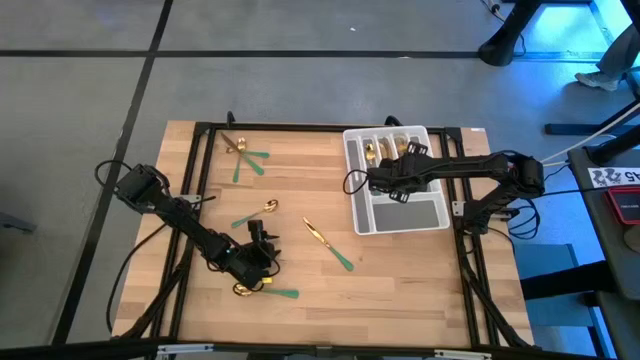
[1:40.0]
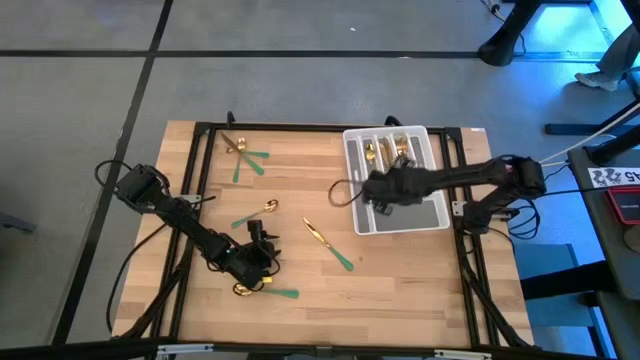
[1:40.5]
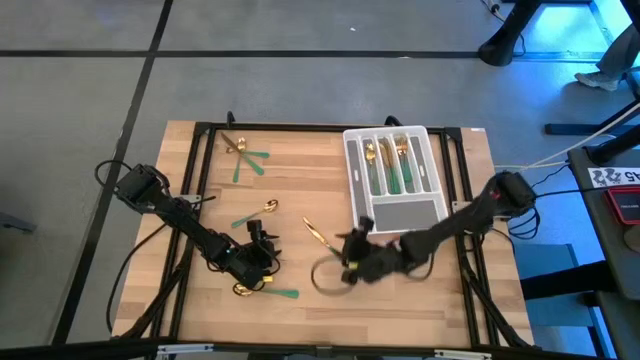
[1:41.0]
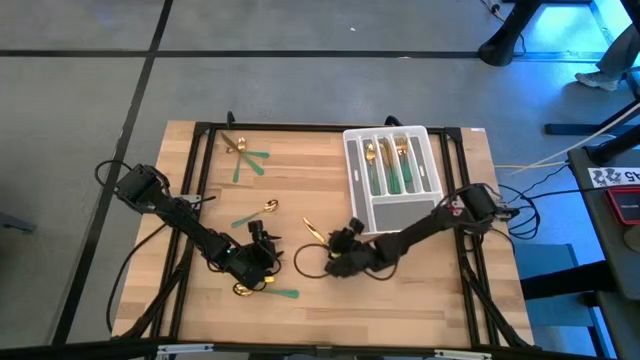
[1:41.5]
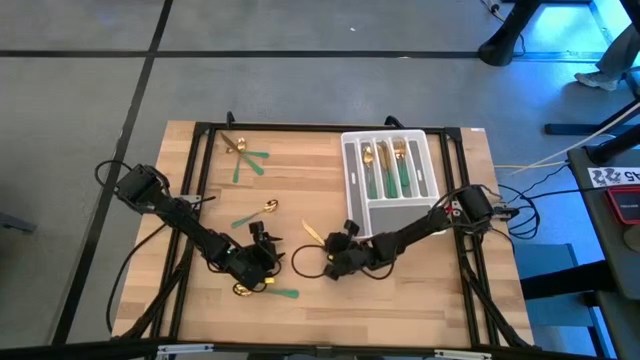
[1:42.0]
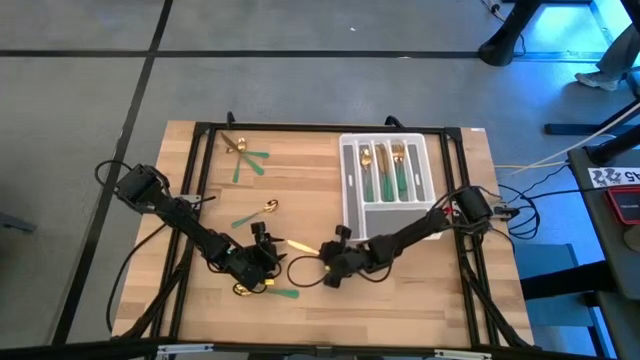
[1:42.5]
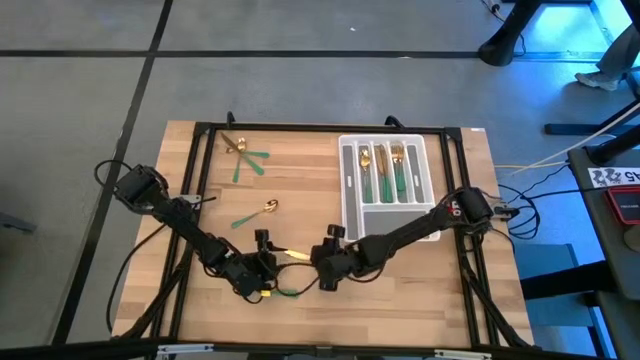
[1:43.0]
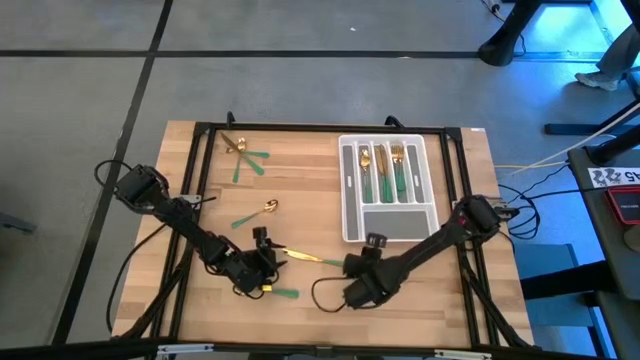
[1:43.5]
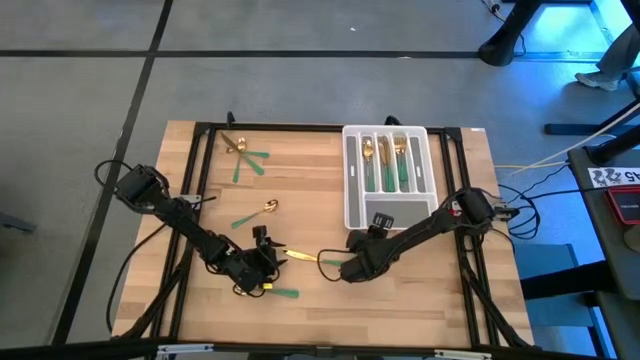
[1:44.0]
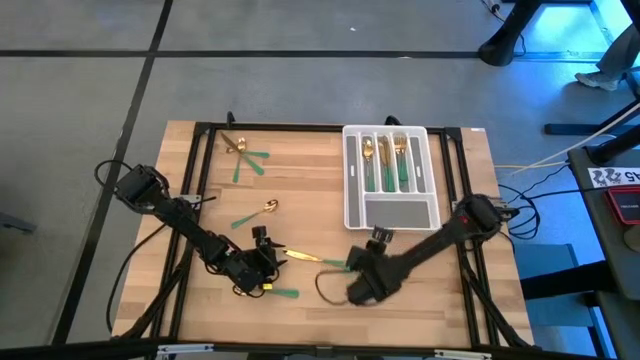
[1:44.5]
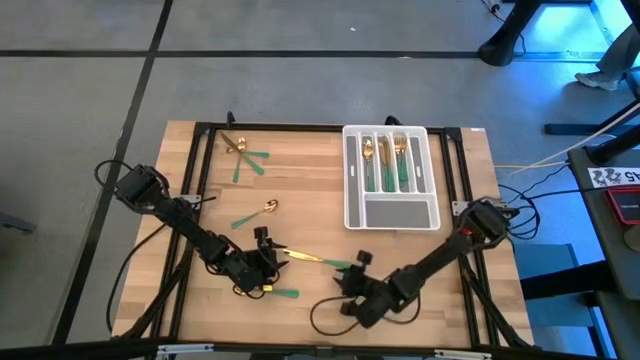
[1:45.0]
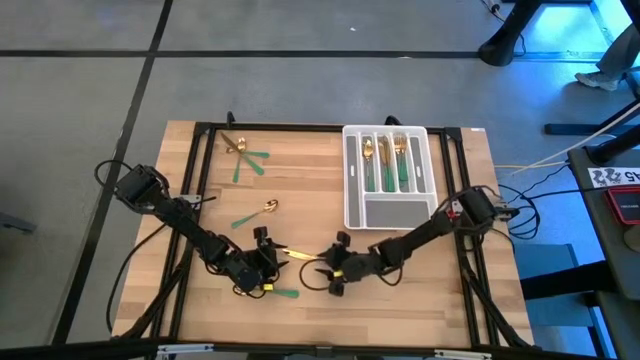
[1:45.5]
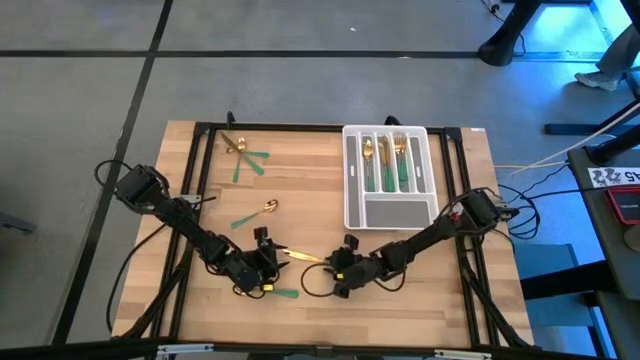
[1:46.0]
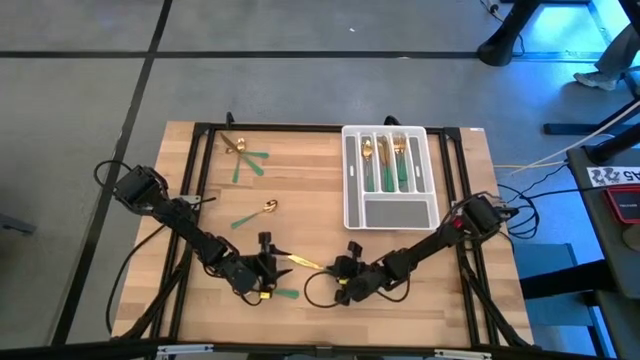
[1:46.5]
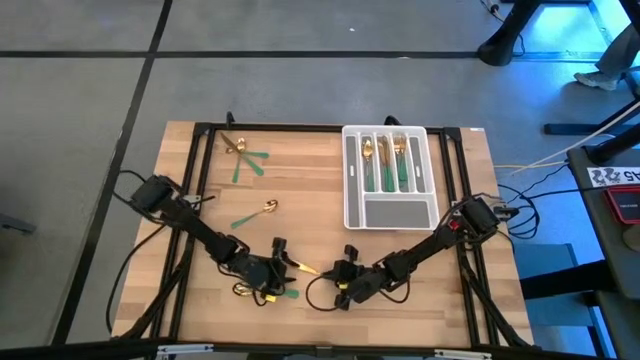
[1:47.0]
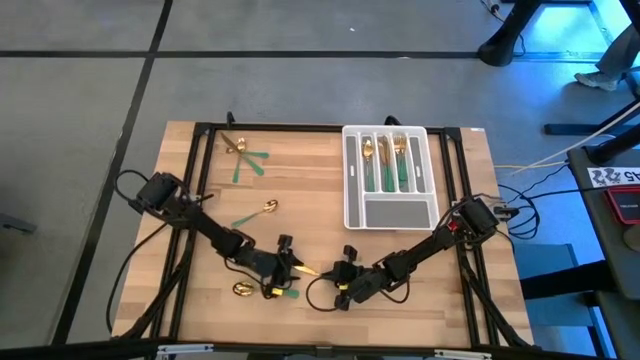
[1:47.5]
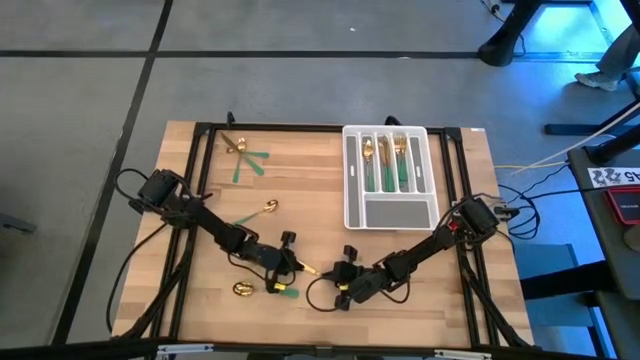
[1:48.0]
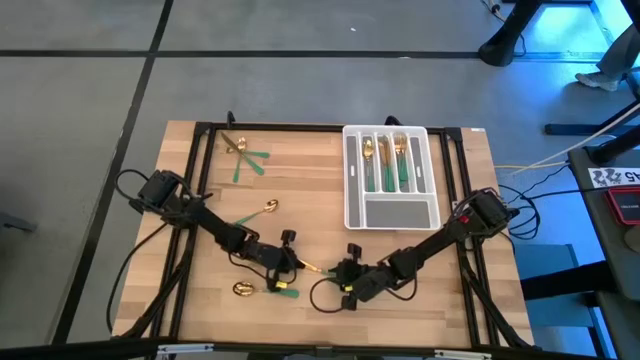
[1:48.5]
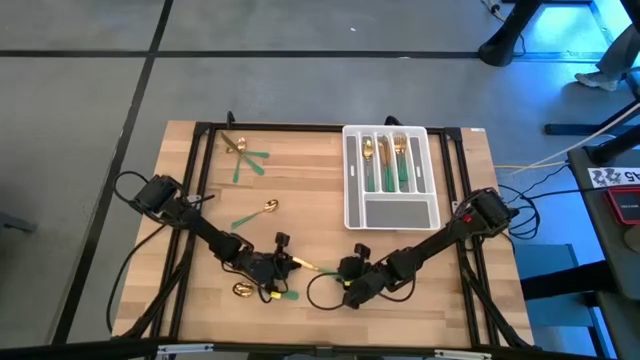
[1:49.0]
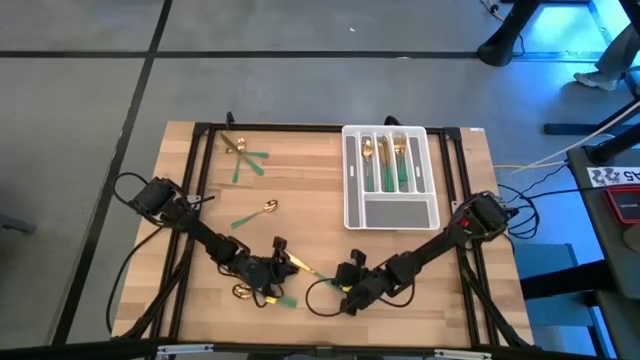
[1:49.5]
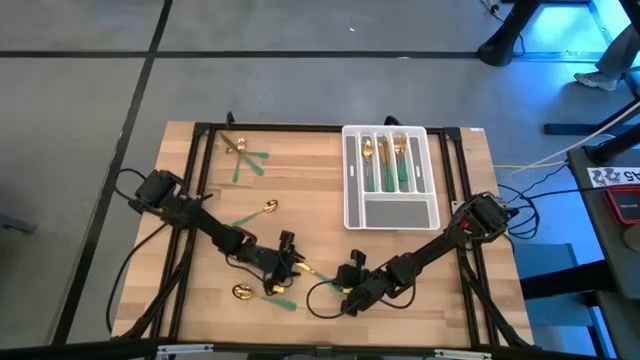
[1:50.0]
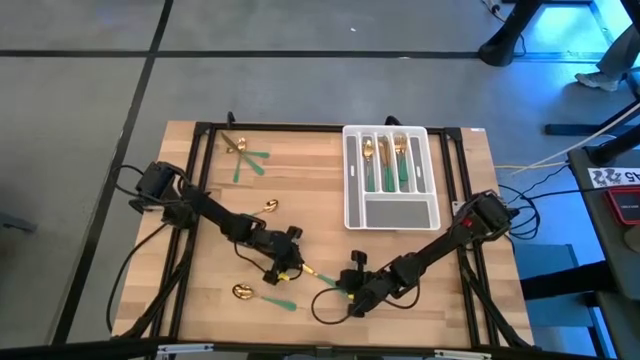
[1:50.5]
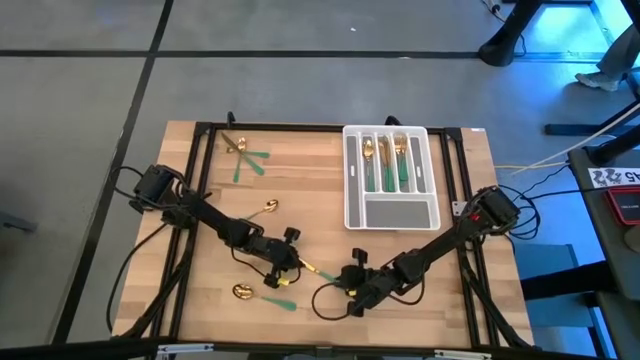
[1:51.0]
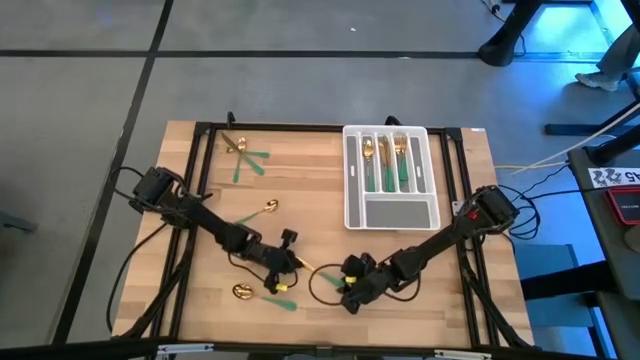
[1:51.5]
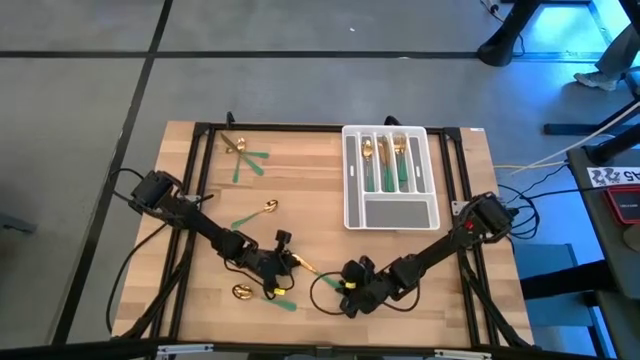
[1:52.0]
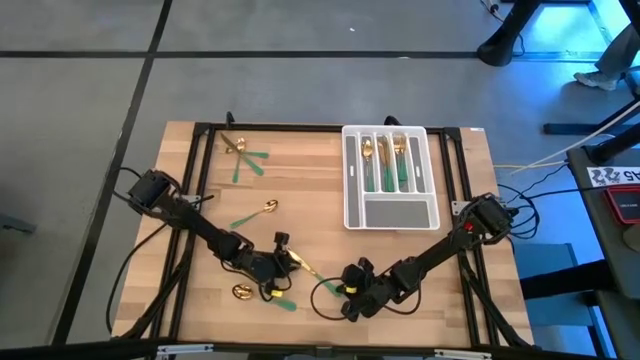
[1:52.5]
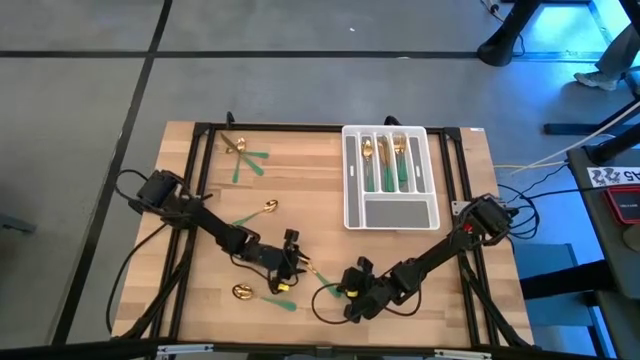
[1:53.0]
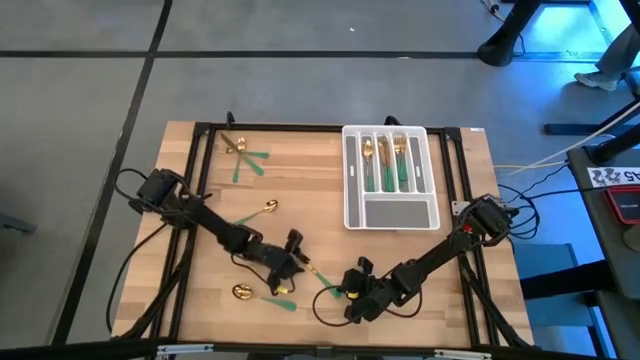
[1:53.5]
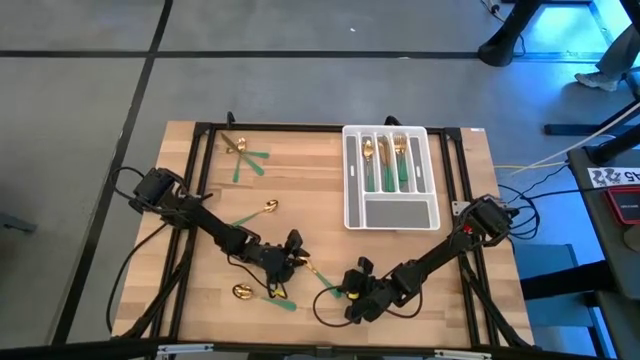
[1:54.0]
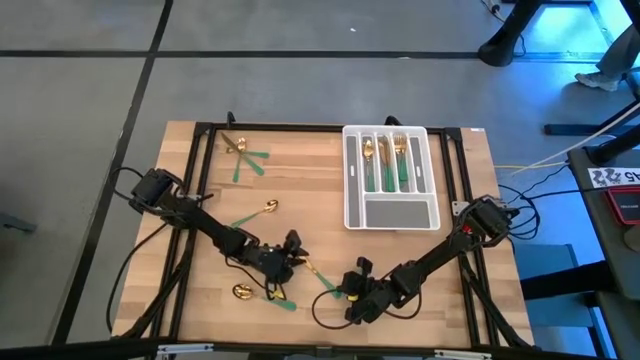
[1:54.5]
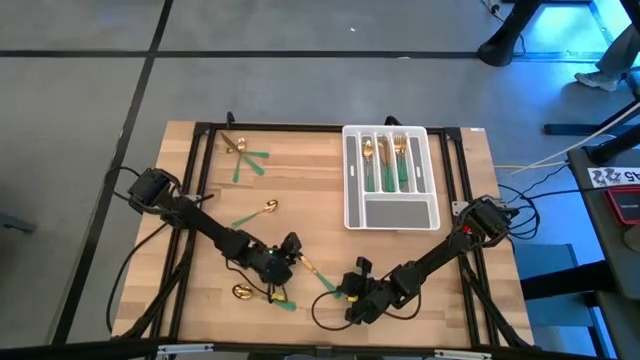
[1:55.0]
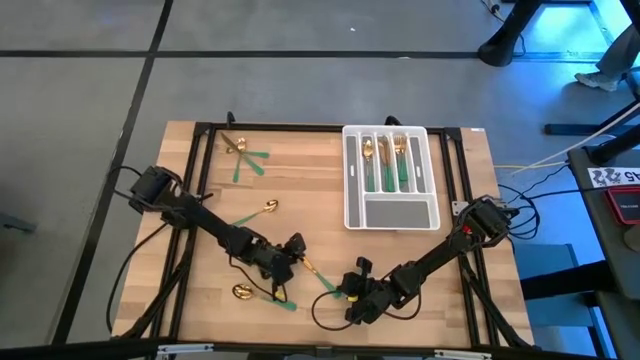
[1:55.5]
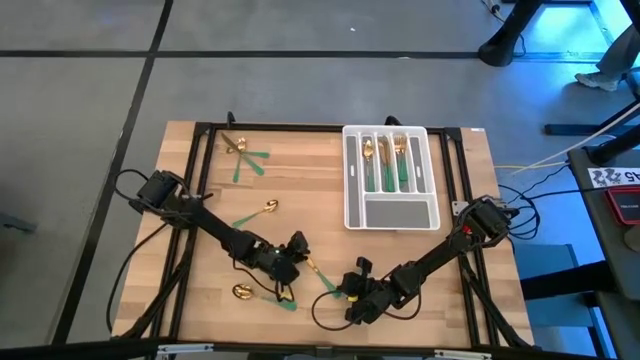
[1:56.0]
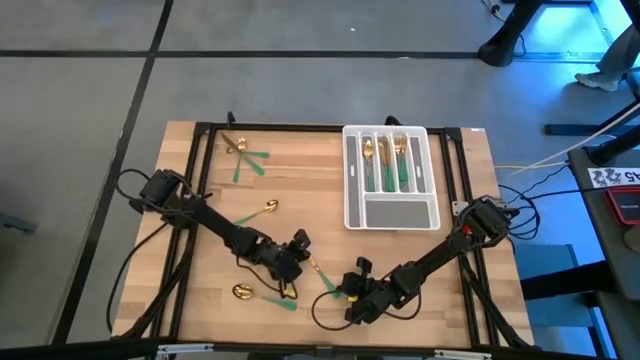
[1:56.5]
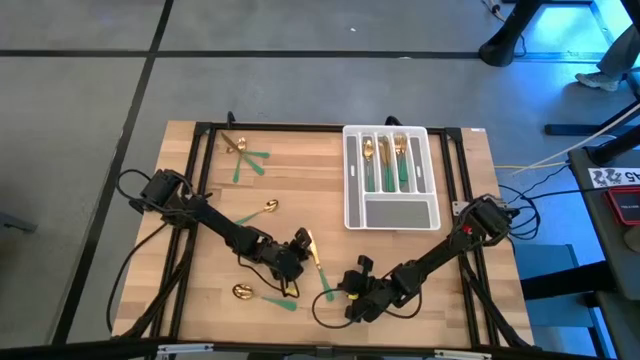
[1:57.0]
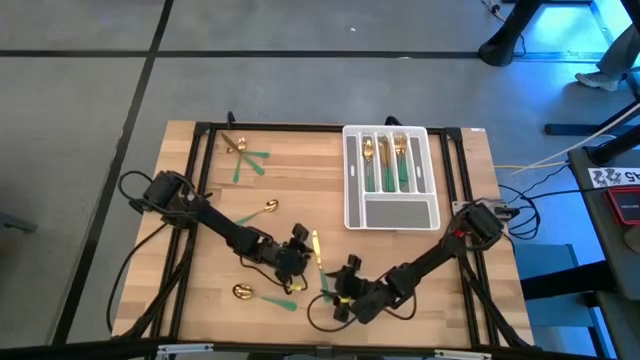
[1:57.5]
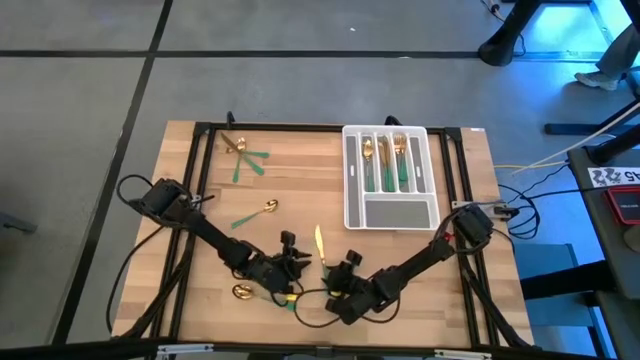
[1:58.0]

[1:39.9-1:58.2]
Task: Sort silverware
Put the green knife into the silverware tray

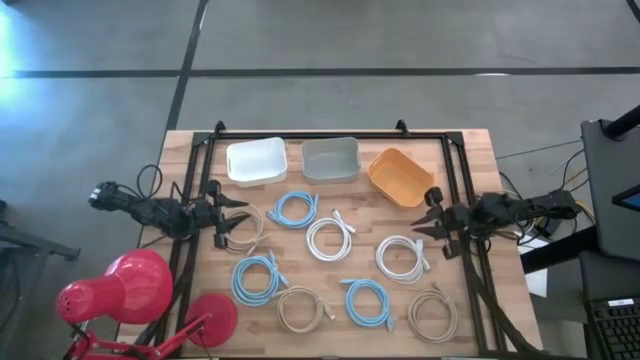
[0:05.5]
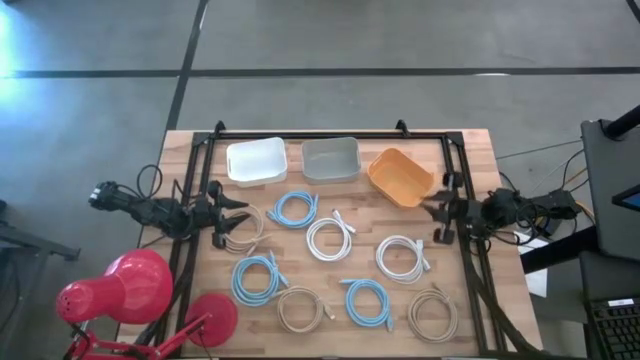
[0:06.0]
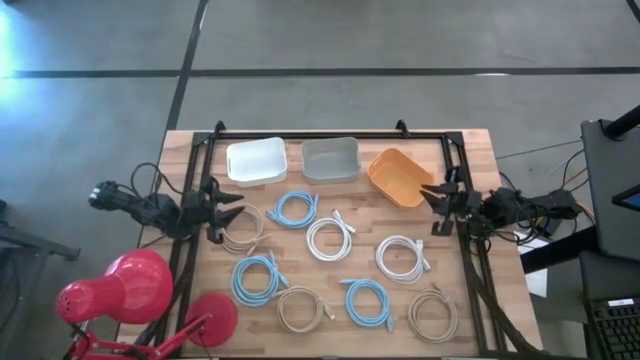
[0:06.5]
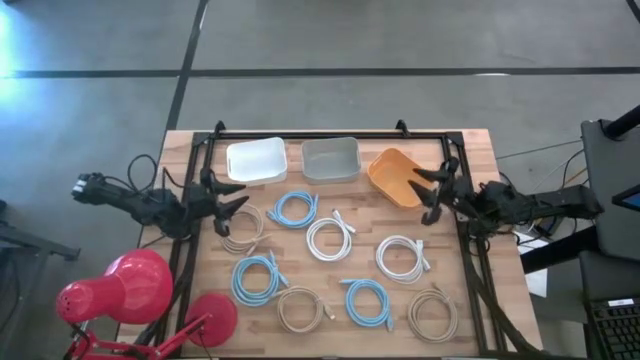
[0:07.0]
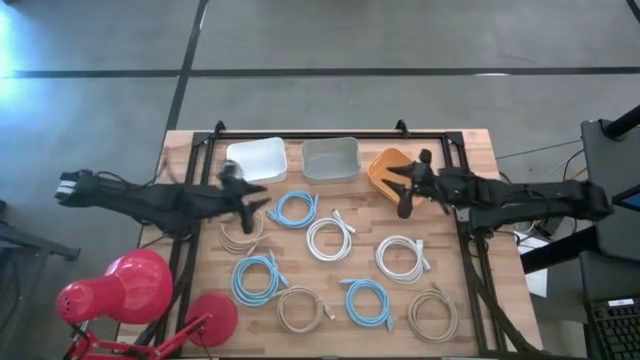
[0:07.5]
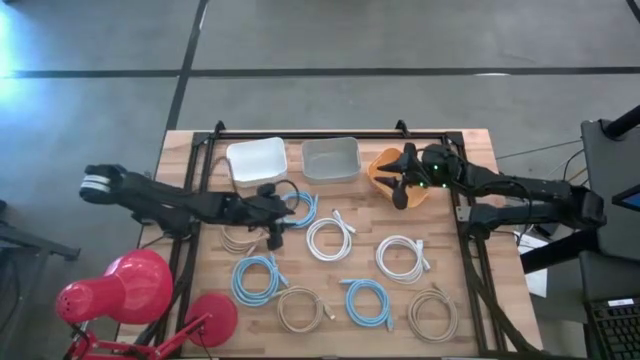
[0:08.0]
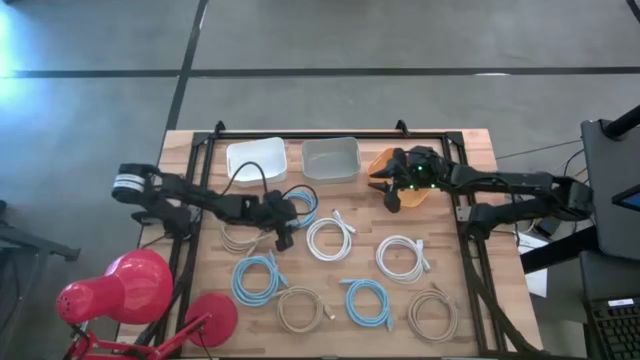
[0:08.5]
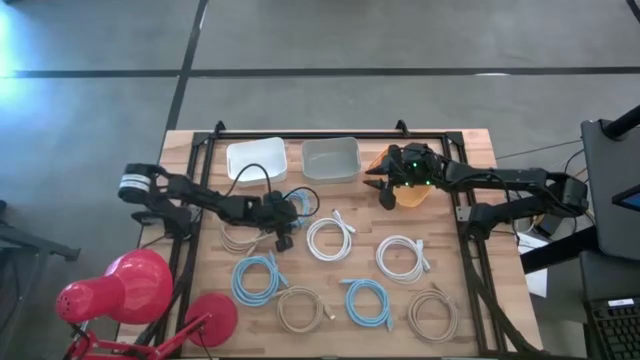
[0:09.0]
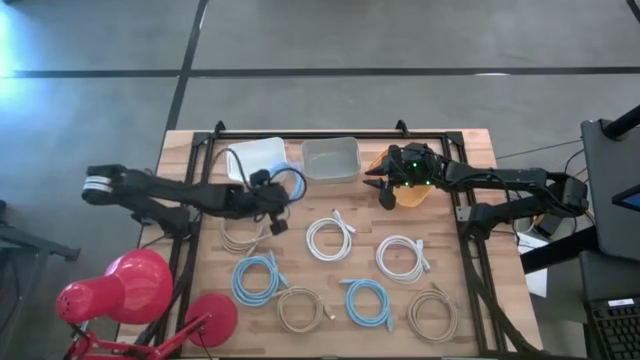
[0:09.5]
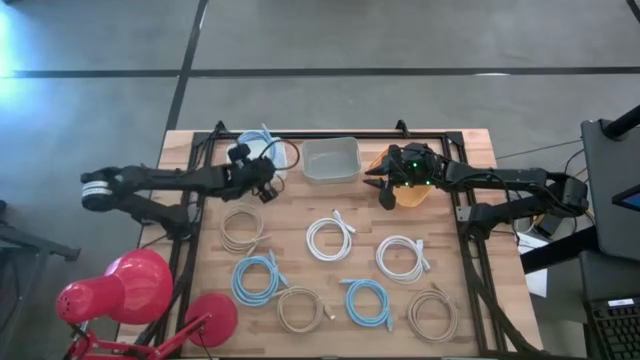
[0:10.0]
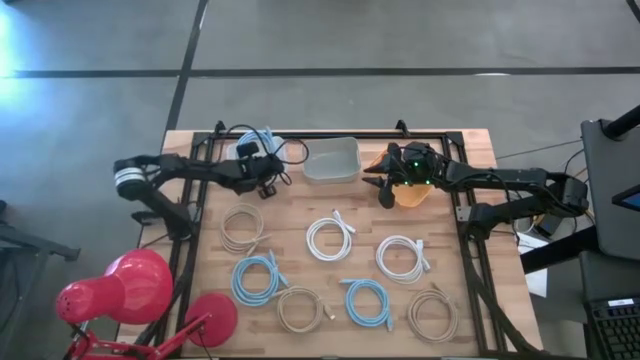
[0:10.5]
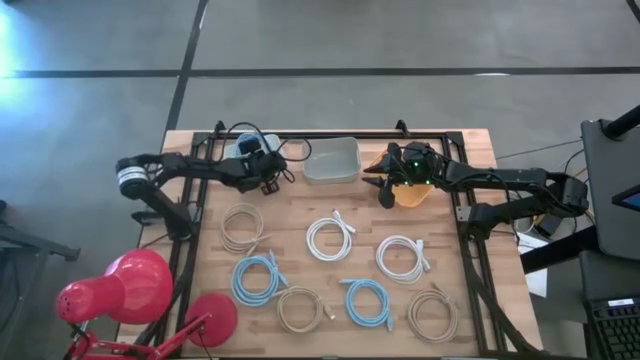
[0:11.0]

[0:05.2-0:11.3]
Task: Pick & Place USB Port
Put the top blue cable into the white bin
